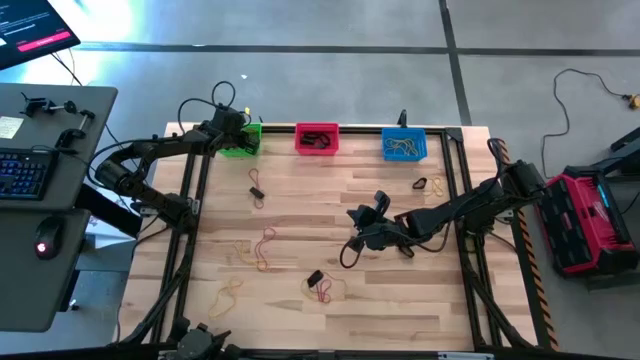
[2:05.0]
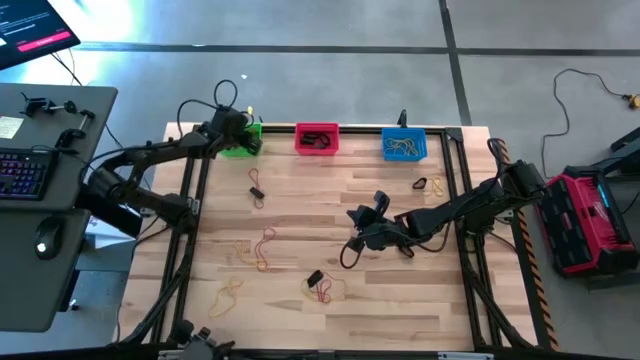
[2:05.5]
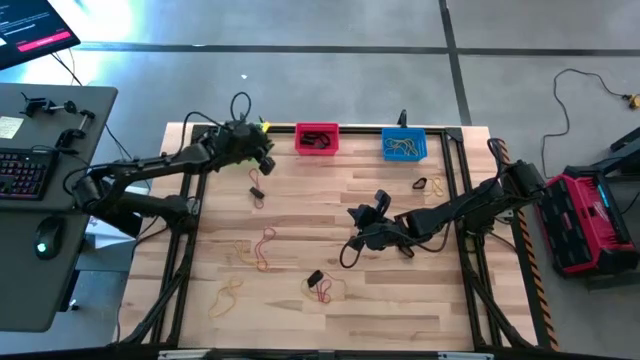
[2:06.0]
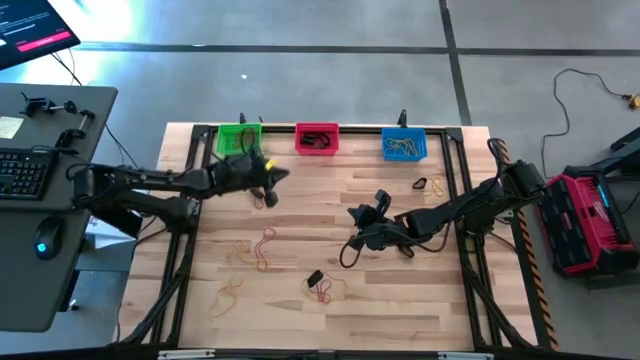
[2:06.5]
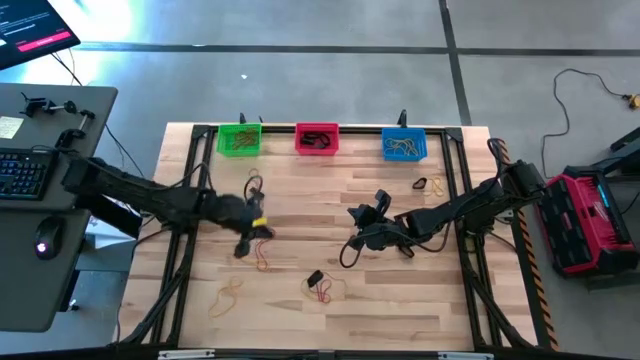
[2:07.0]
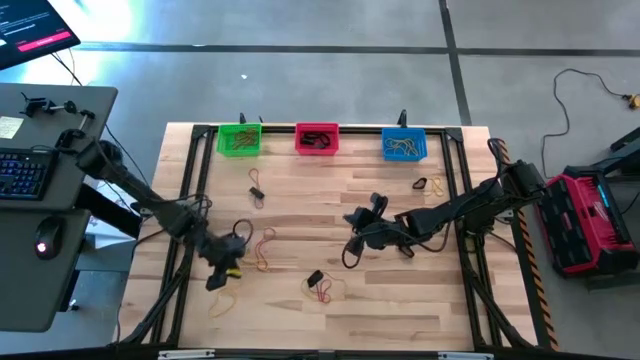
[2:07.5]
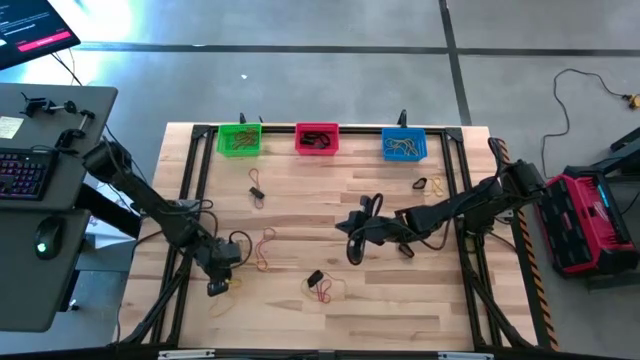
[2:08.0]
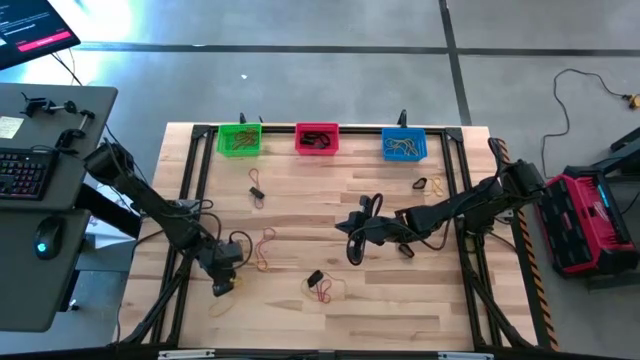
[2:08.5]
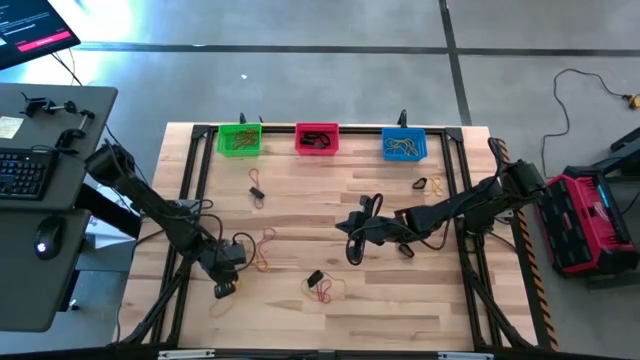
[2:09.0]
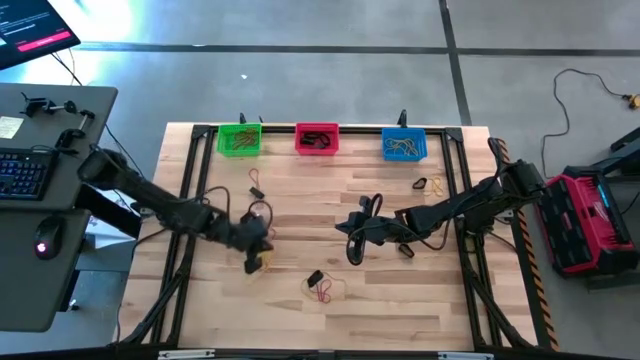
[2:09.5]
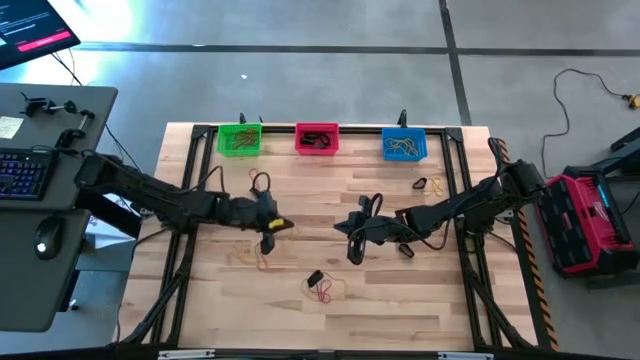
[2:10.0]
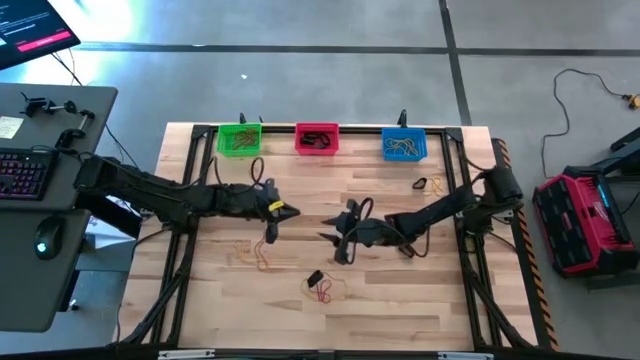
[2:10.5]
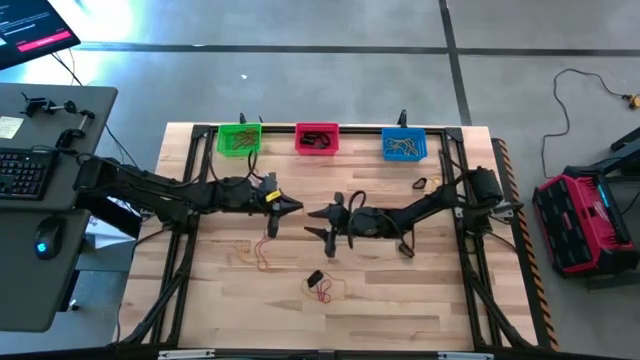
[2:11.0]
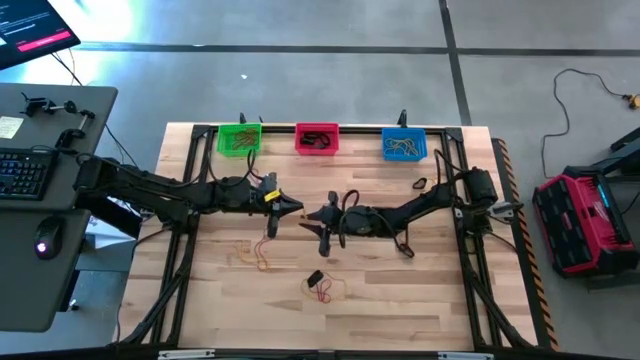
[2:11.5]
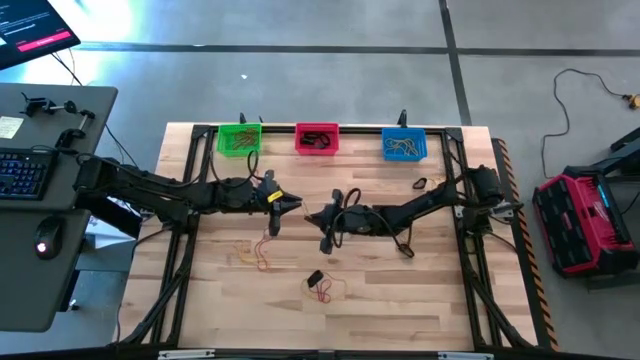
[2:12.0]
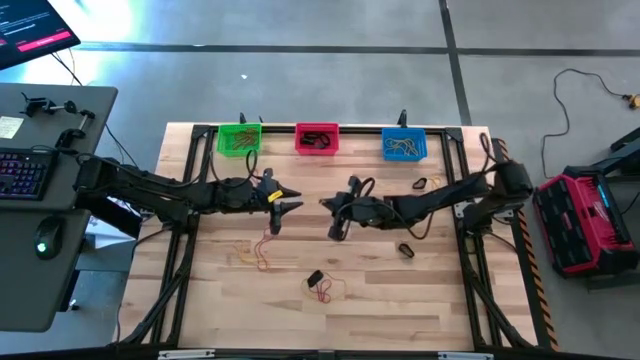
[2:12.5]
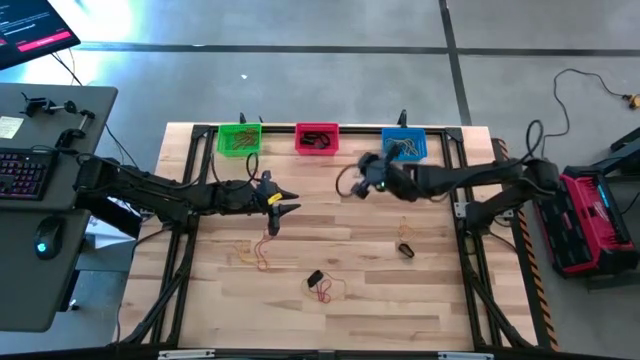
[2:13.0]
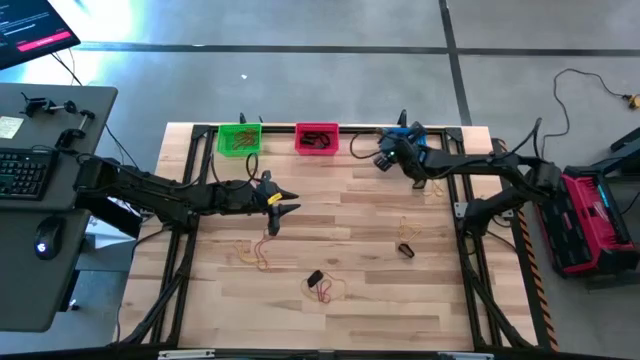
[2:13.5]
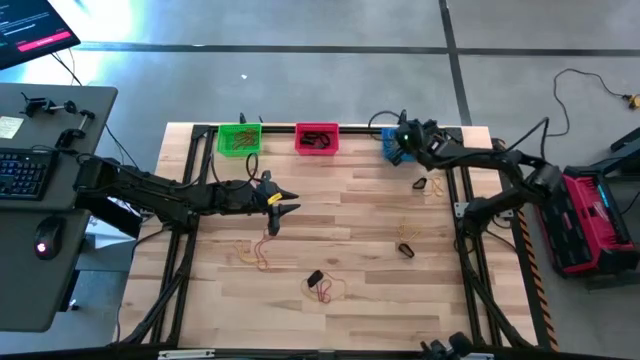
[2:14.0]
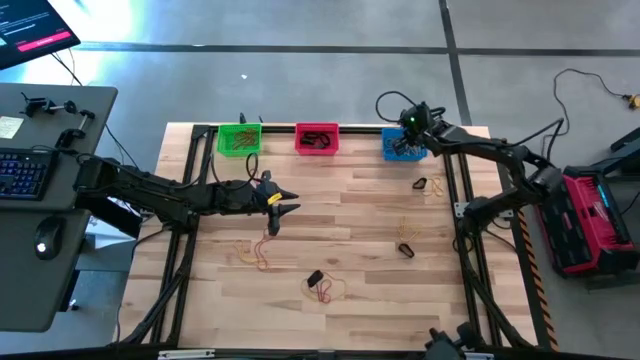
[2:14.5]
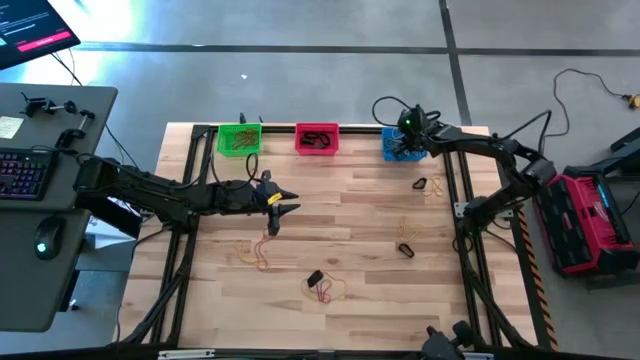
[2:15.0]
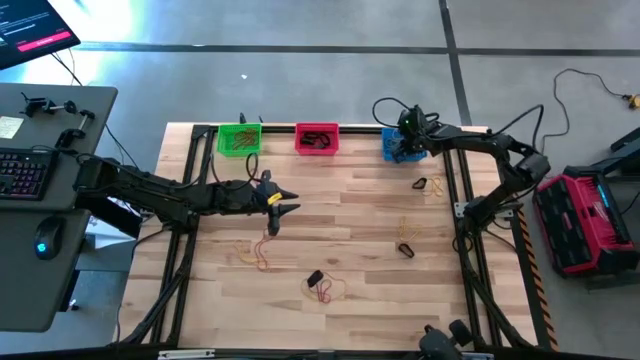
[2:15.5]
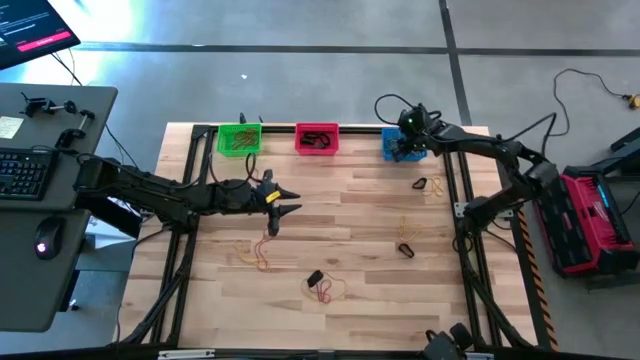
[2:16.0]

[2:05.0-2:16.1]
Task: Sort rubber bands into baskets
Put the yellow rubber band into the blue bin

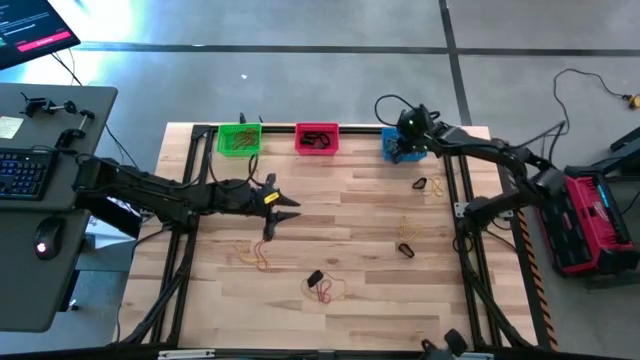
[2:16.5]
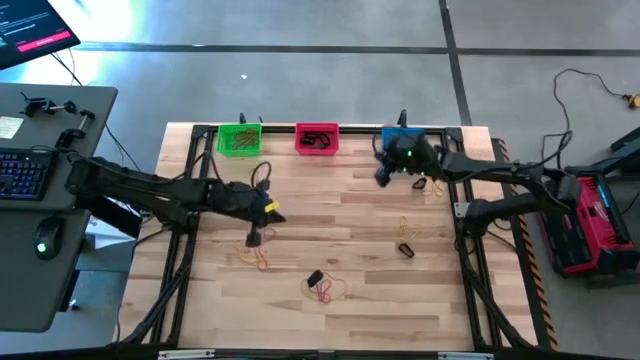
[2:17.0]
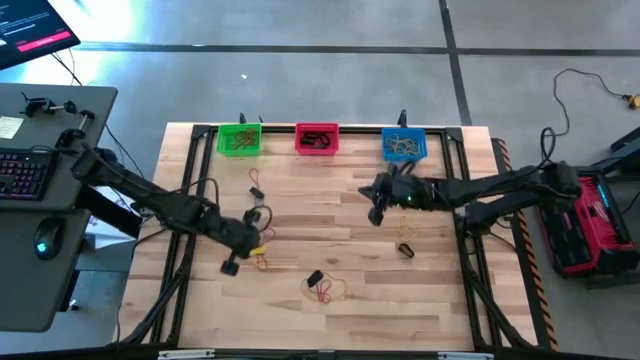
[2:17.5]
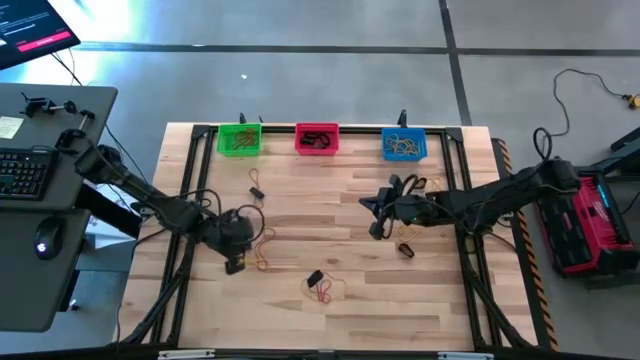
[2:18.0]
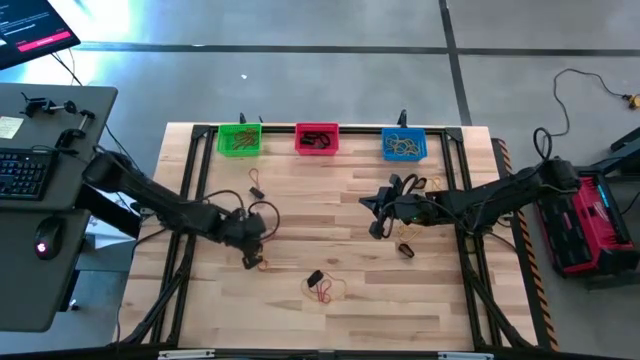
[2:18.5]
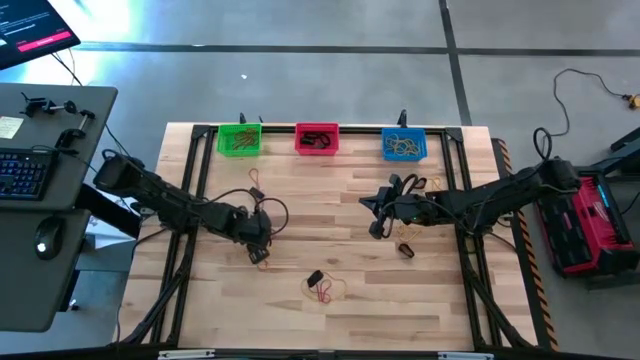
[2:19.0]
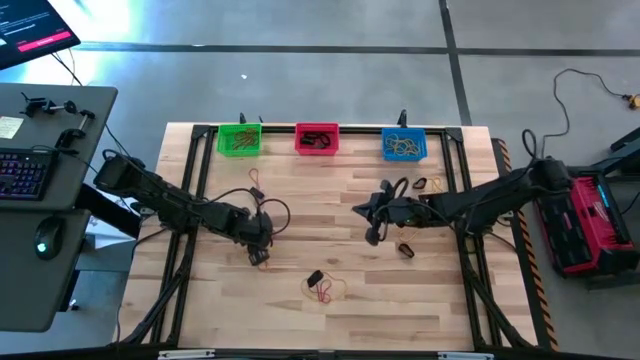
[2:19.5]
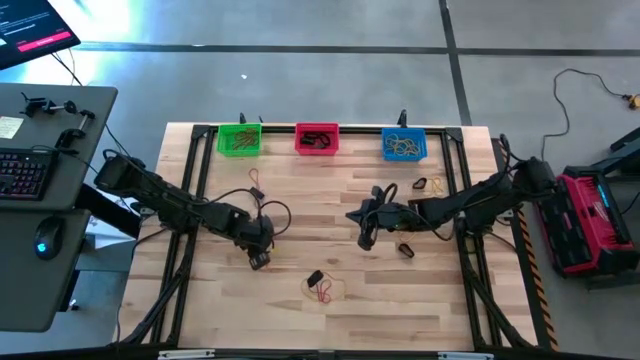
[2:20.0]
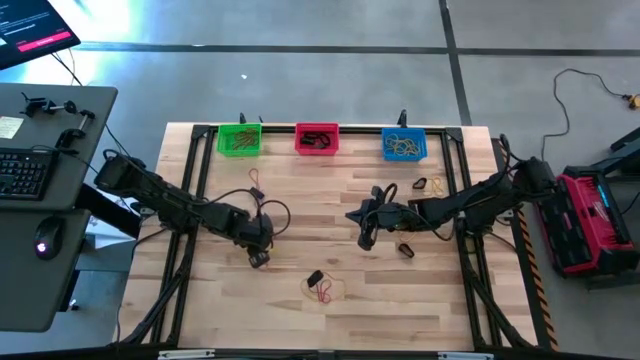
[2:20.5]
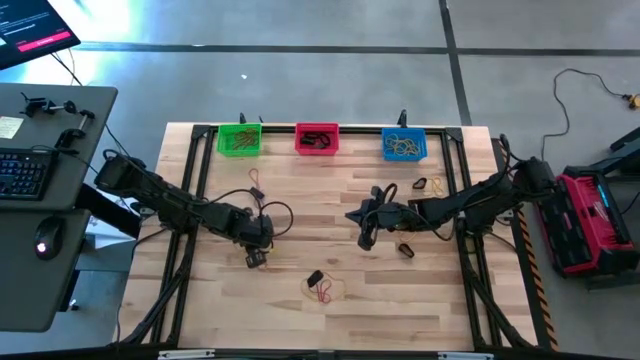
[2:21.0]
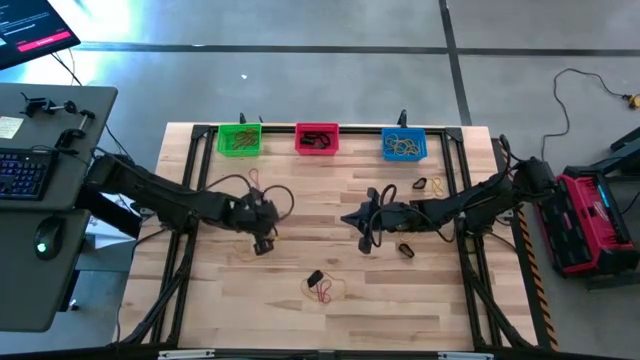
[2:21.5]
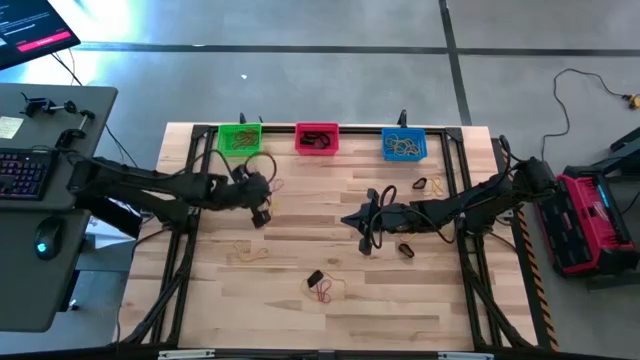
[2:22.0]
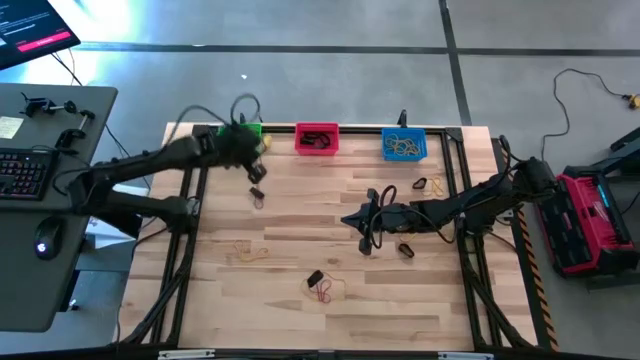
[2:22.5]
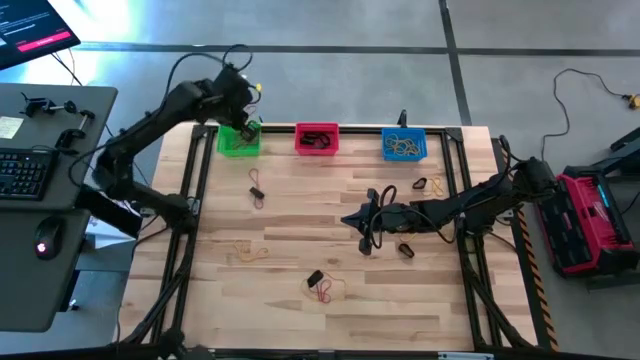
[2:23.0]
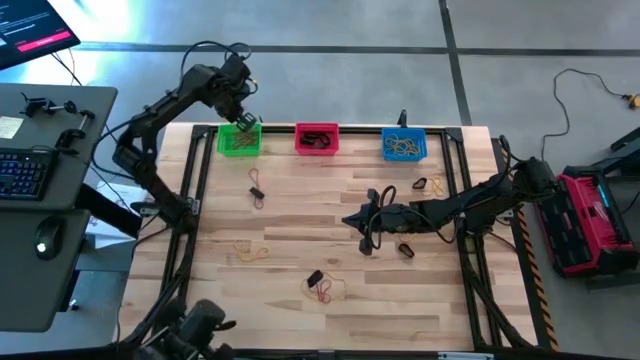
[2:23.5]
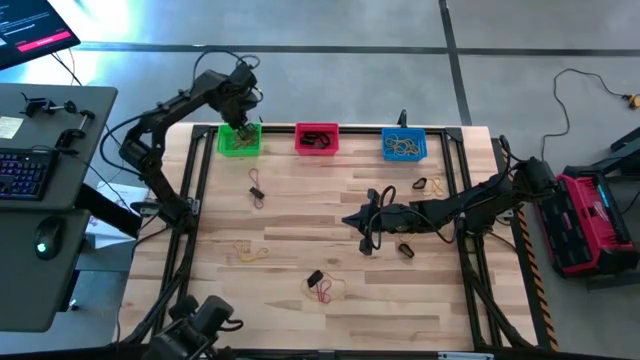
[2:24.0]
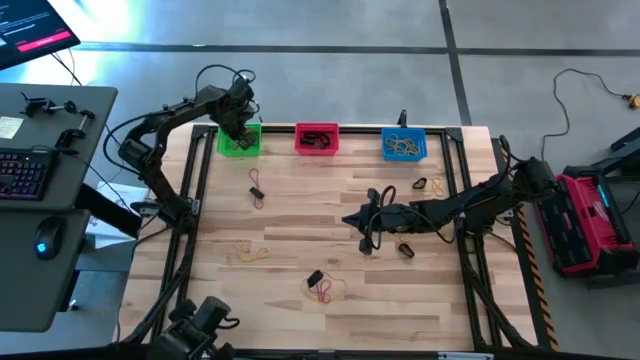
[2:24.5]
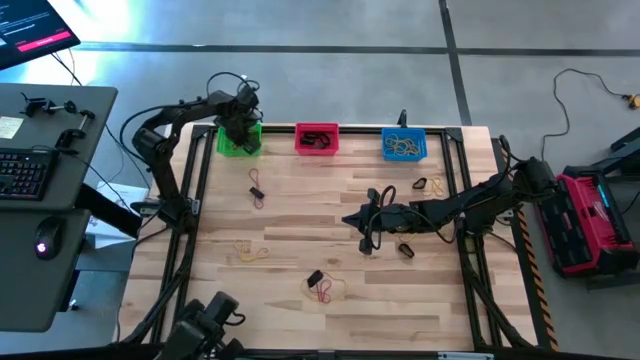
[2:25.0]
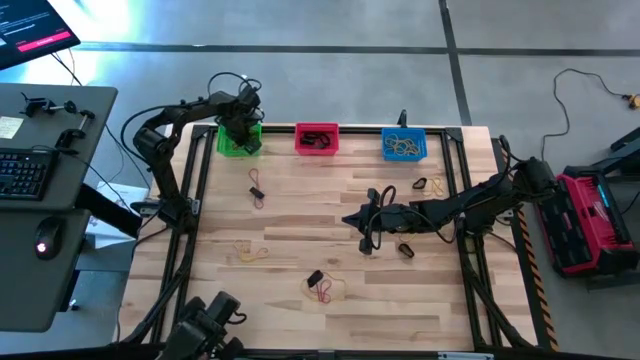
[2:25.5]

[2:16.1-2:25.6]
Put the red rubber band into the green bin
